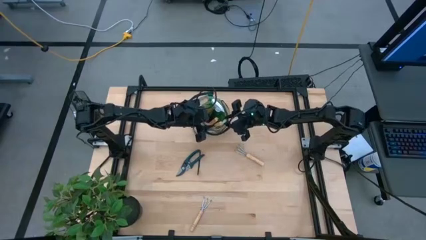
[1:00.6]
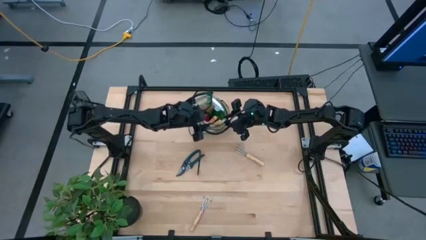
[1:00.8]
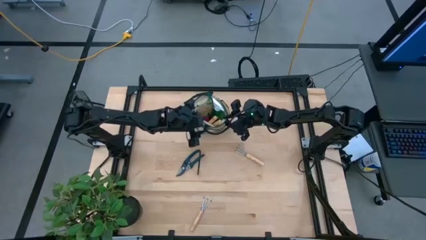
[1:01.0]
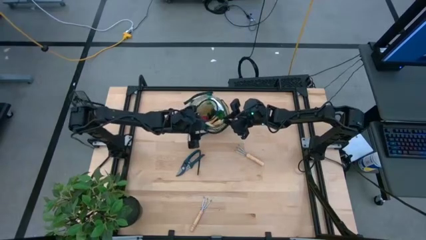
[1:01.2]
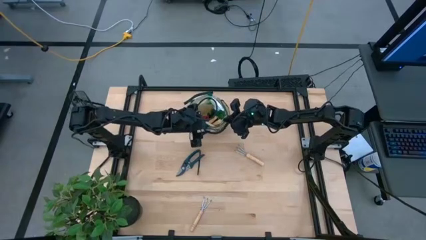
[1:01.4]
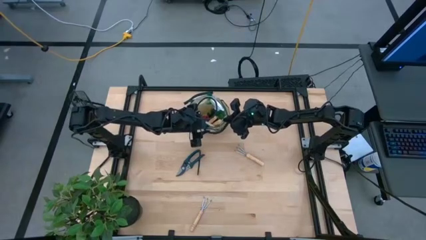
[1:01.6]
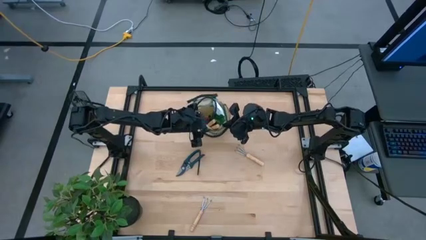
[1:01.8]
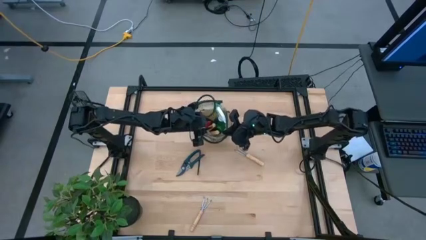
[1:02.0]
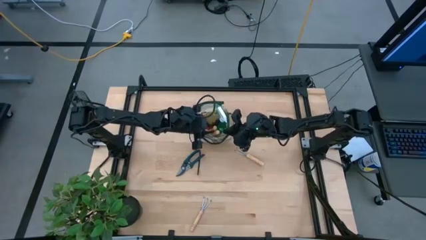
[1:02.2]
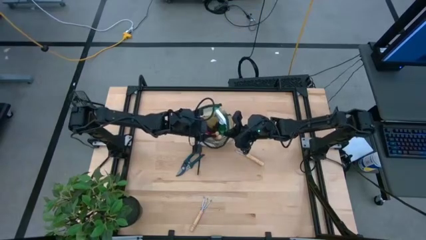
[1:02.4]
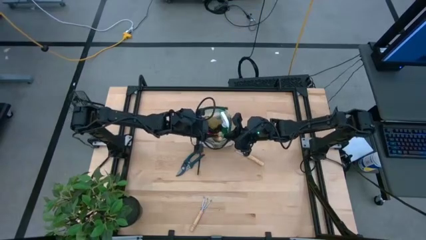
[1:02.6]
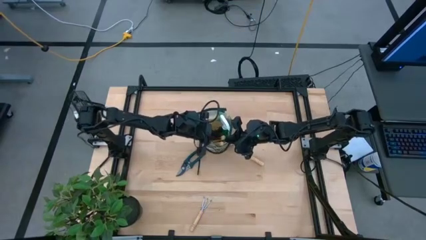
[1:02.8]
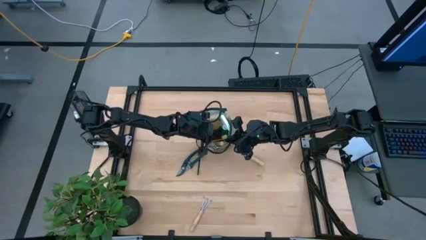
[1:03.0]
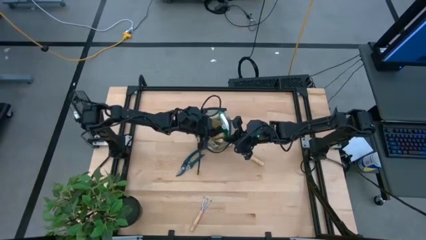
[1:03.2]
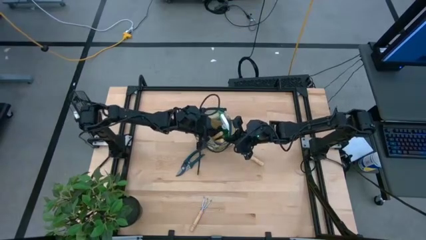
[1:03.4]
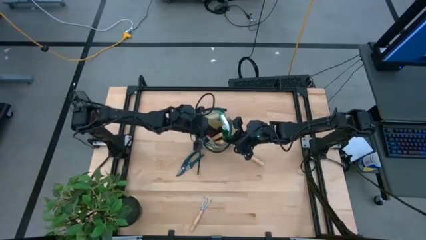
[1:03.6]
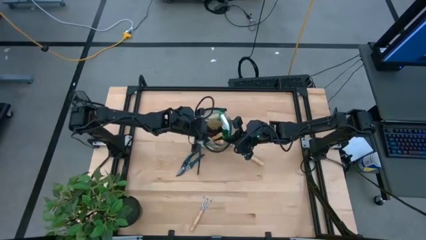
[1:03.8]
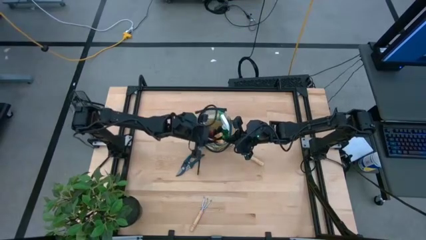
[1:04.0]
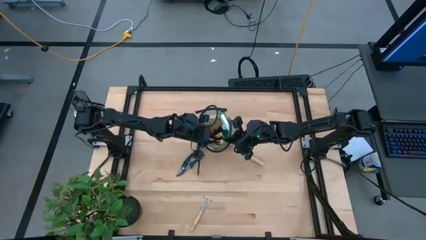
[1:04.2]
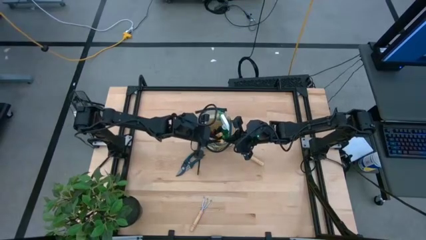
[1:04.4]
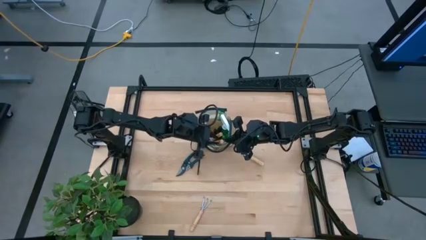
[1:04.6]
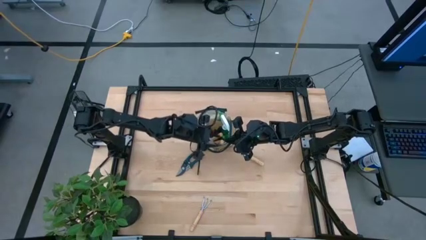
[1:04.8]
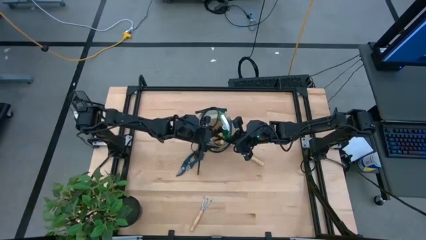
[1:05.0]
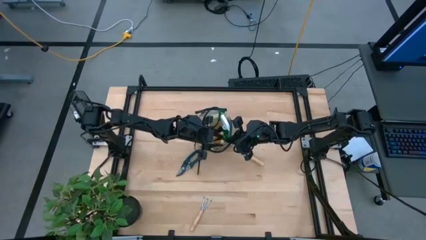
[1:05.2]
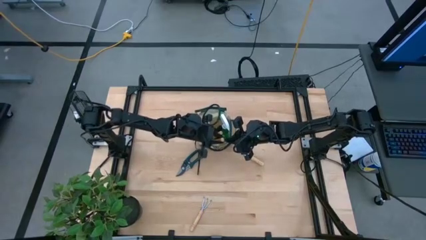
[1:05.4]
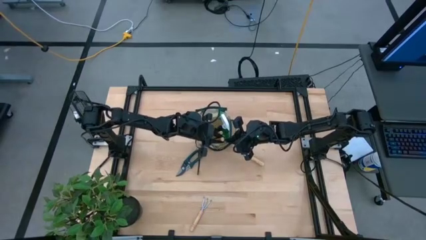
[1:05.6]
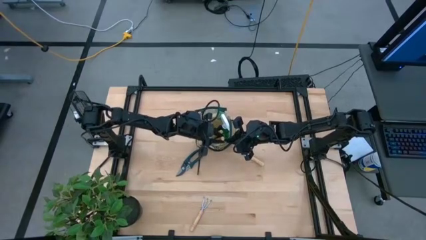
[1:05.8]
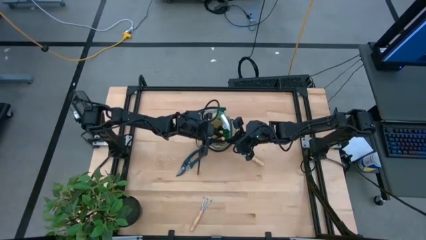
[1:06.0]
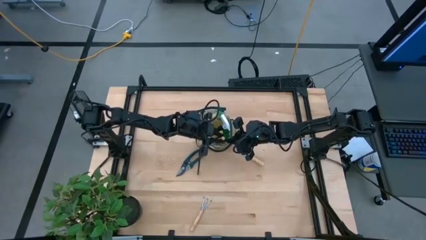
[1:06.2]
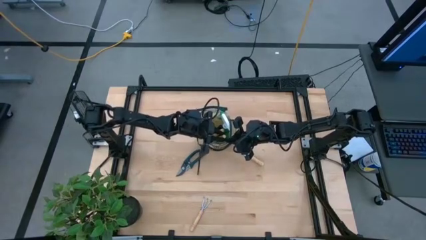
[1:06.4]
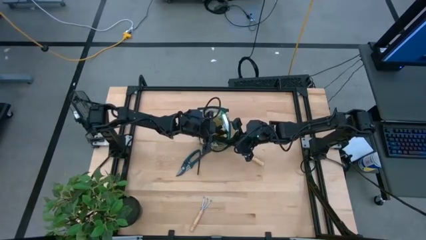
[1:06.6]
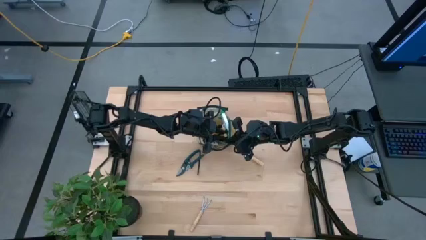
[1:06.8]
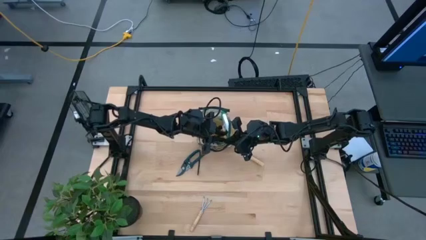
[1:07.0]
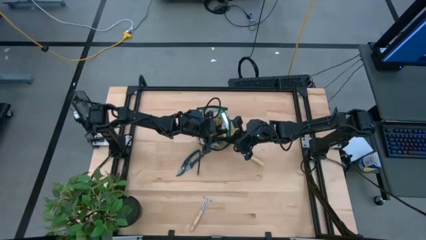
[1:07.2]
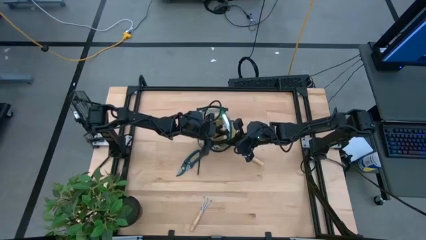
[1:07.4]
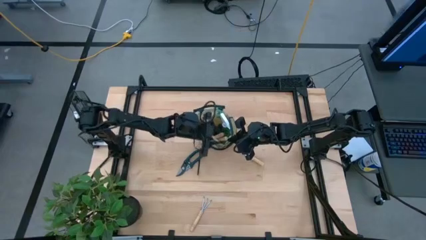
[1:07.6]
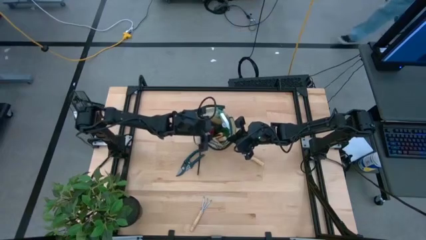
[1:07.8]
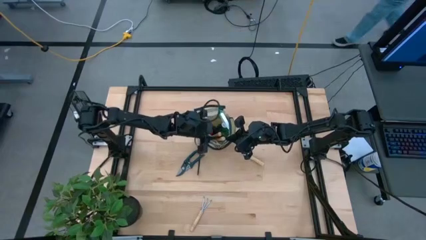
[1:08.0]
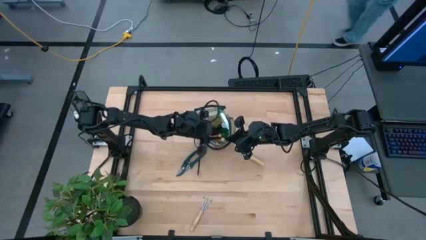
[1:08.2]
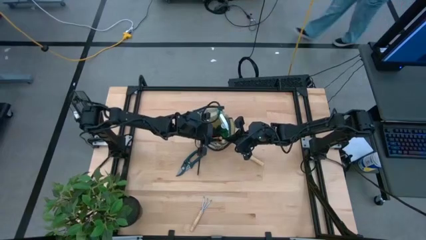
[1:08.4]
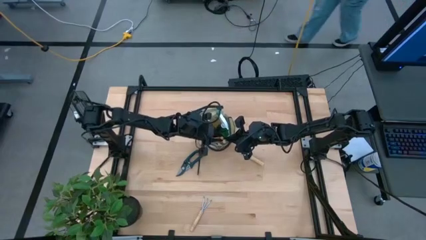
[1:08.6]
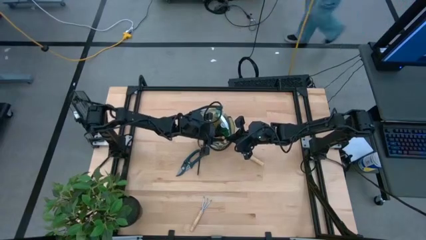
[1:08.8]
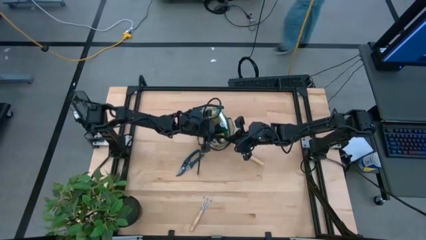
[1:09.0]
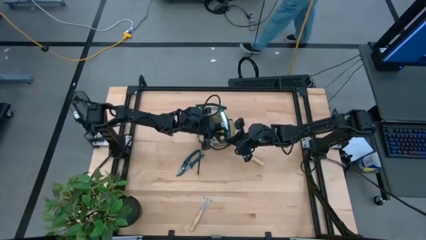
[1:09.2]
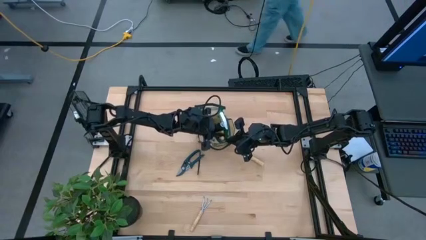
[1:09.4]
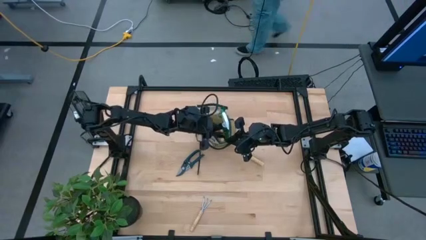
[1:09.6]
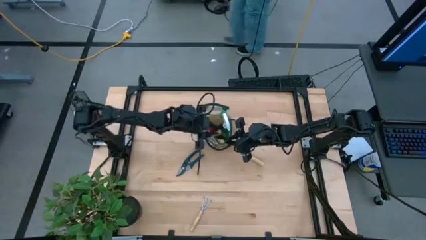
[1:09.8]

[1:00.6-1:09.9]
Task: Pick & Place Garden tools in Gardening bag
Adjust the trowels on the gardening bag
